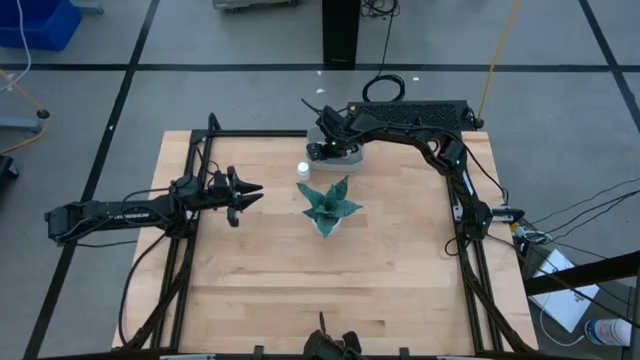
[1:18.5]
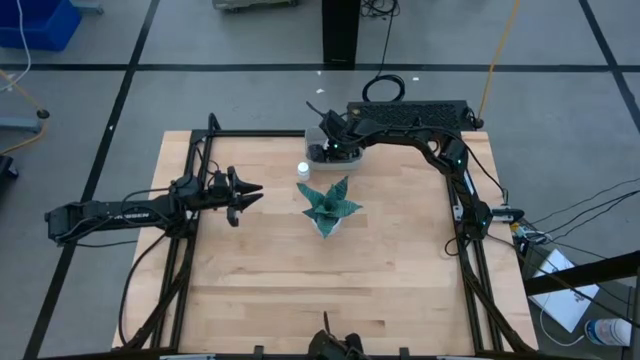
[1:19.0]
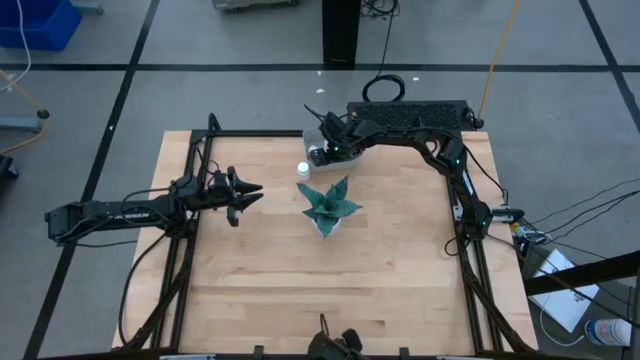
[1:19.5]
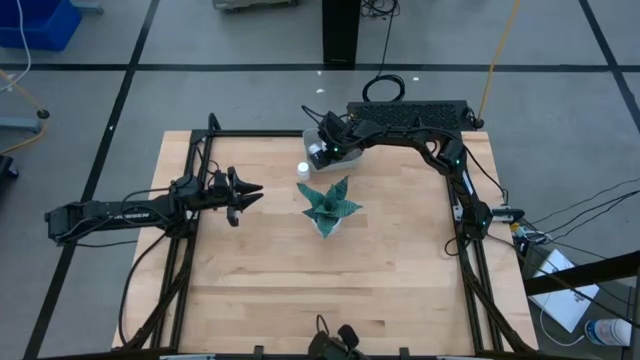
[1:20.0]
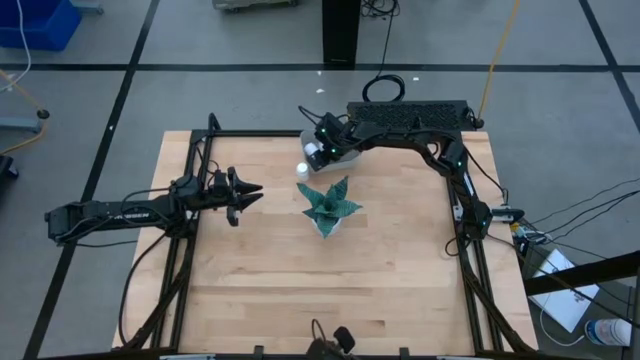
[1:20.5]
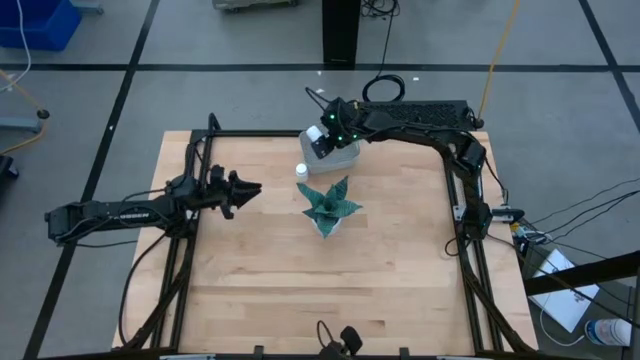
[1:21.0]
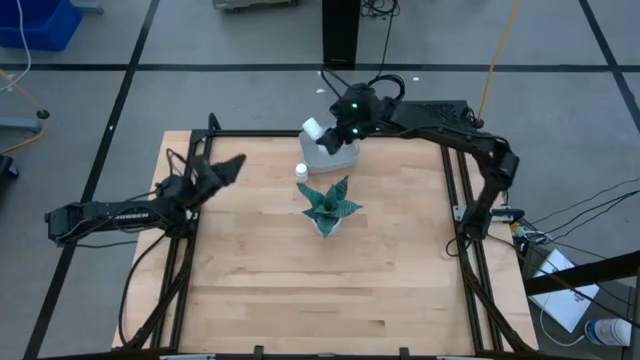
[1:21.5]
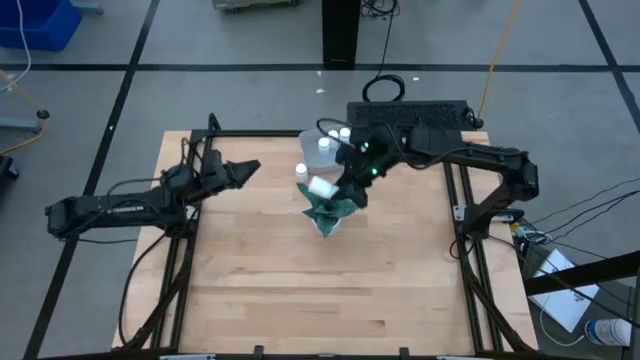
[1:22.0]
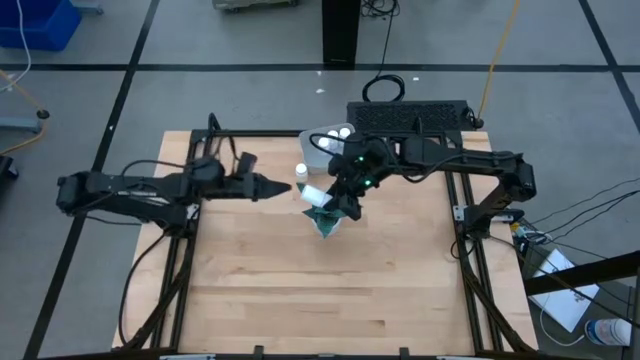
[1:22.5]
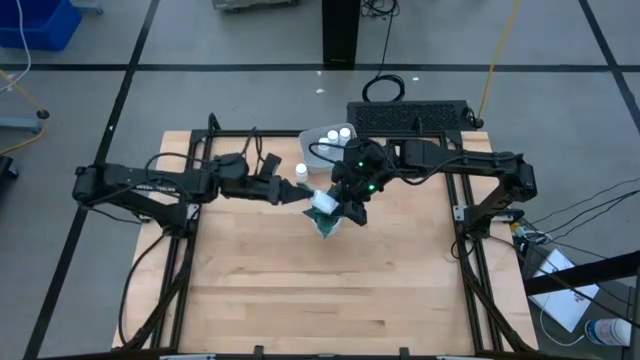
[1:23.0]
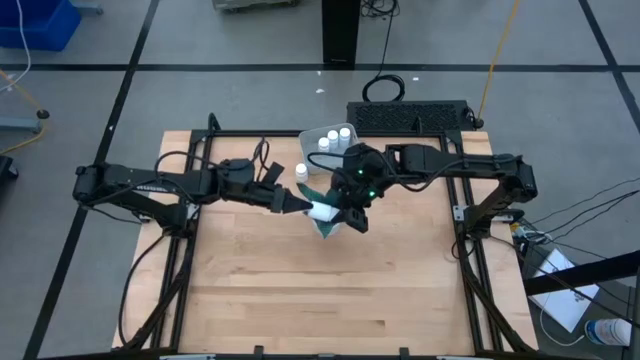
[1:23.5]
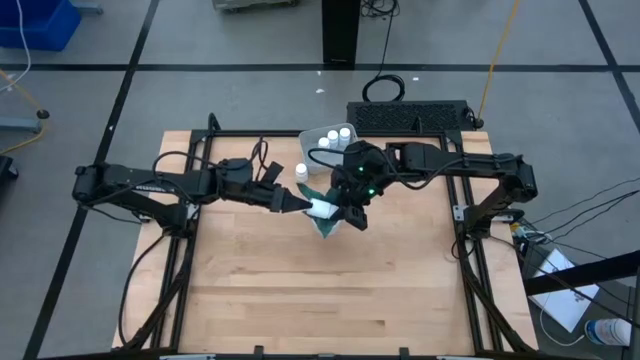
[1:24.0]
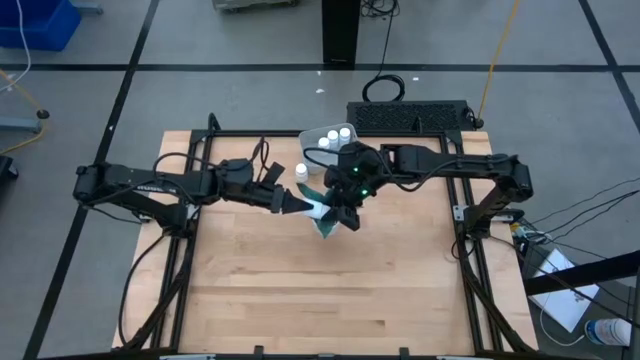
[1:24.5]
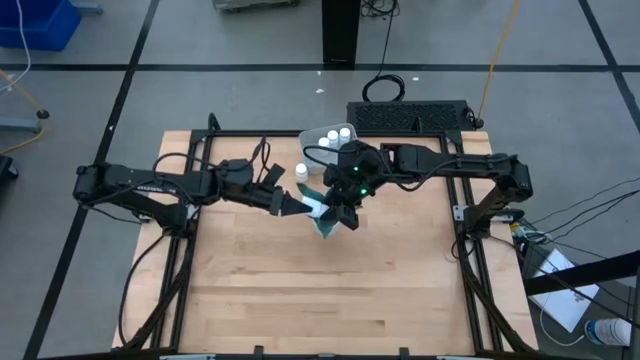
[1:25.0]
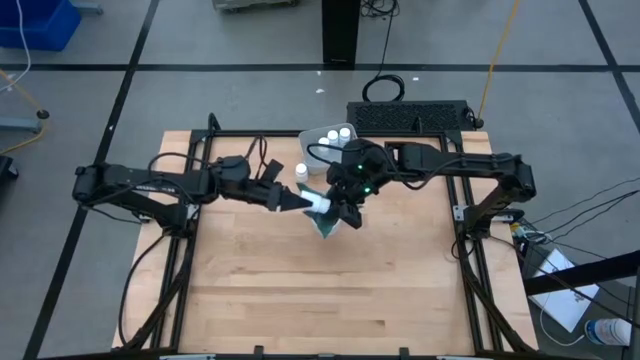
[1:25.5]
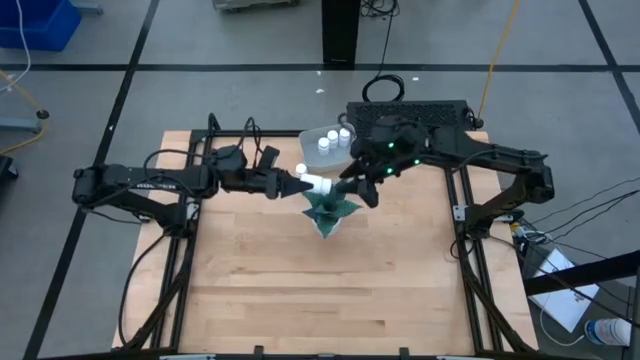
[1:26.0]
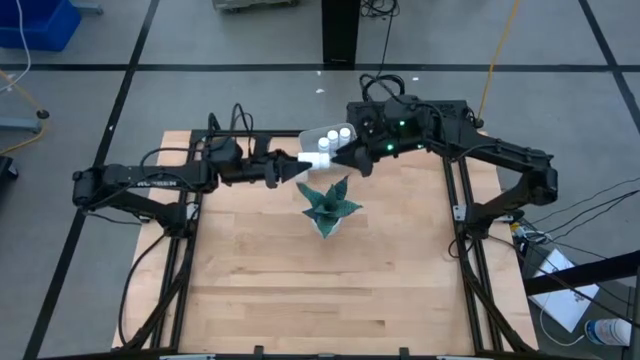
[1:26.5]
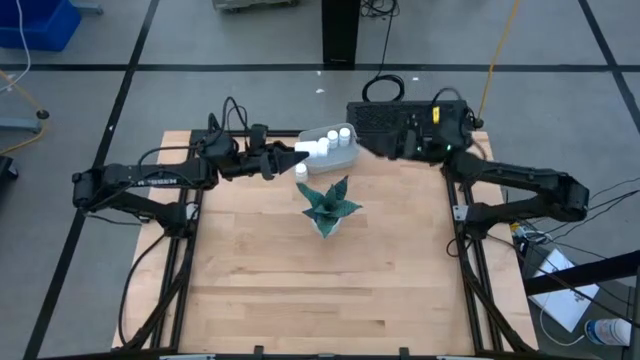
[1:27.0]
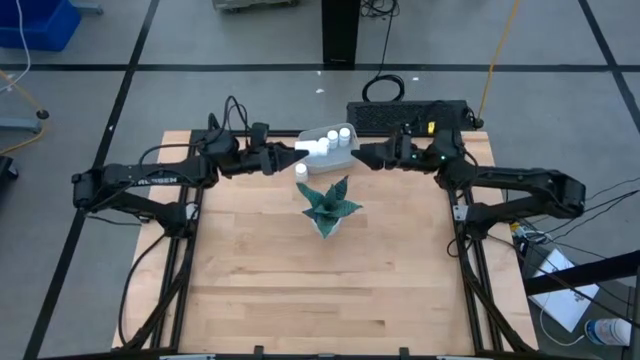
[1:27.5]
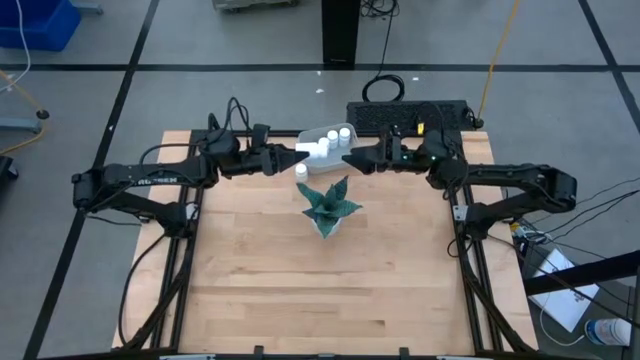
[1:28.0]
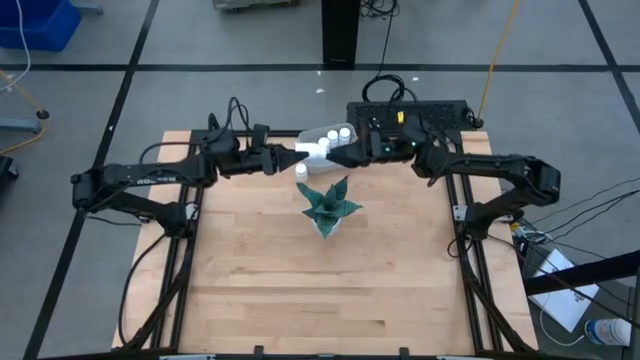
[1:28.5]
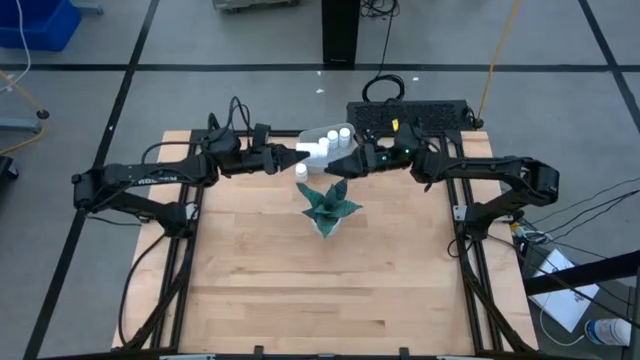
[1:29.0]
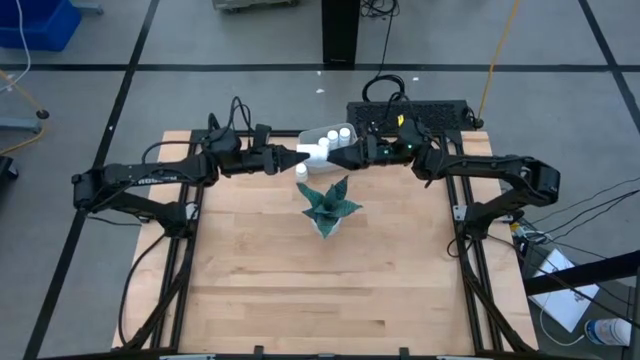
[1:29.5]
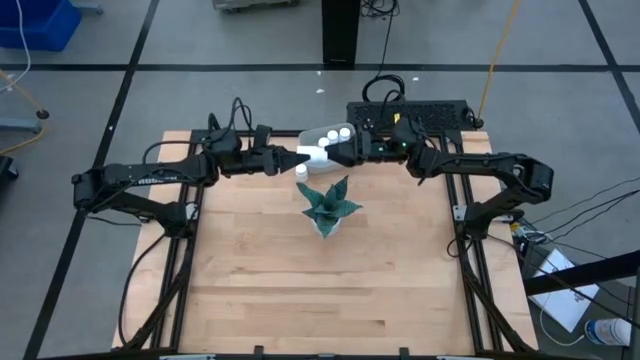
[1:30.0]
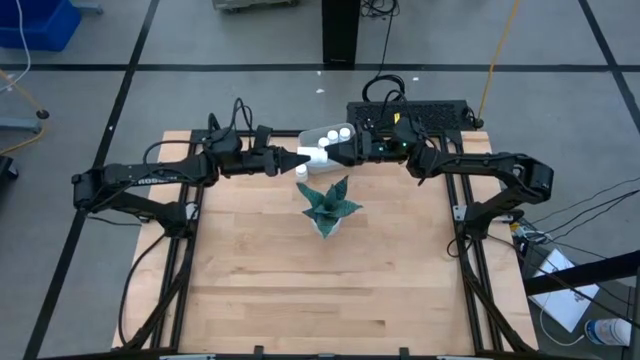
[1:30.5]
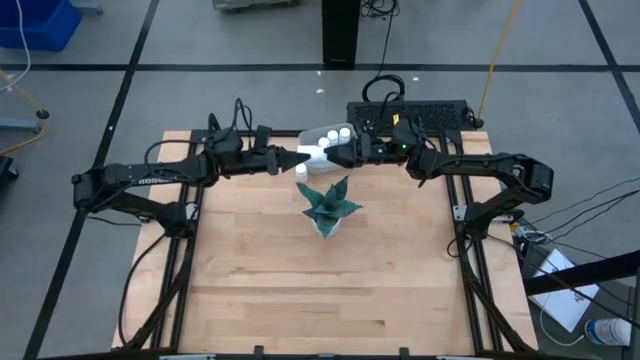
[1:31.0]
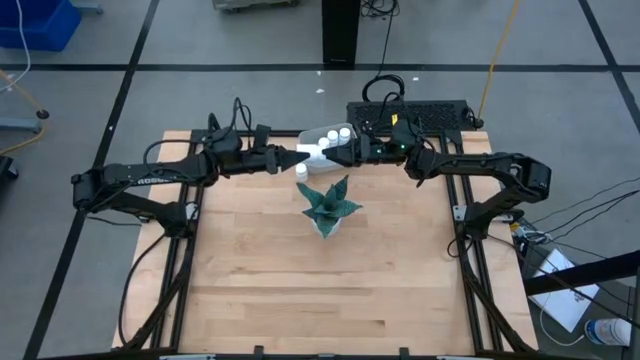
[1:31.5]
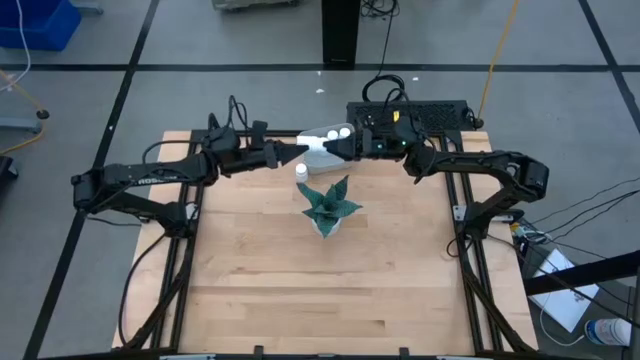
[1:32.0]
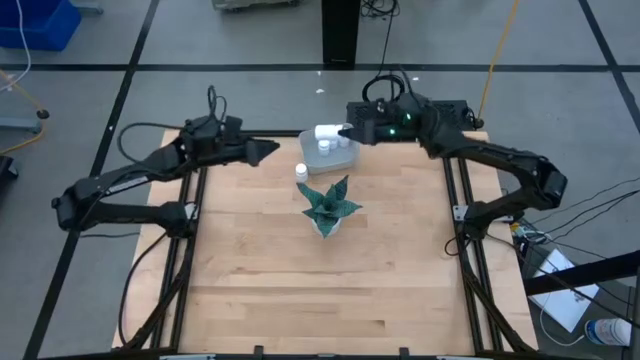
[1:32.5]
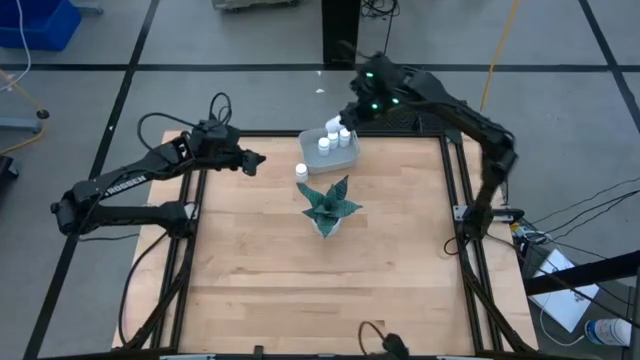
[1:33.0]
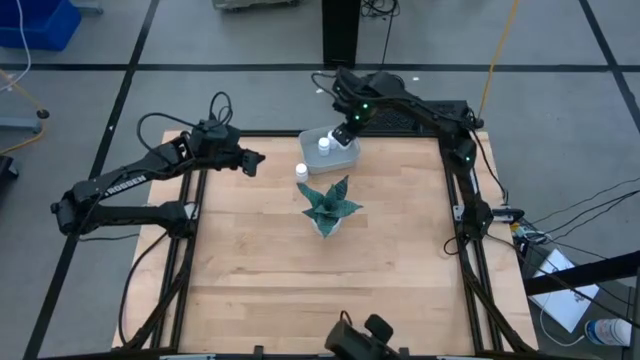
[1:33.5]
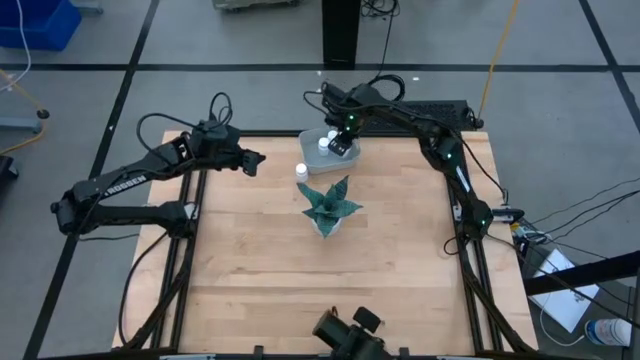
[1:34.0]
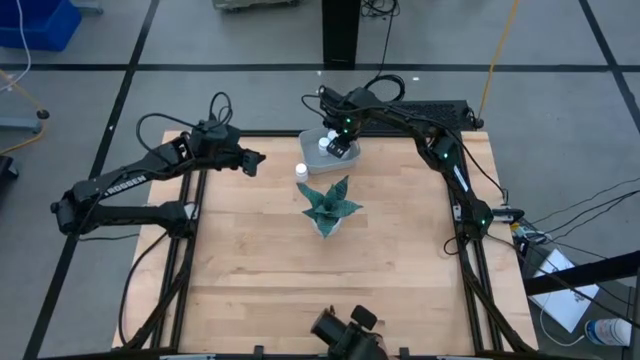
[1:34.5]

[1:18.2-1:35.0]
Task: Pick and place pill bottles into a basket
Put the white medicine bottle into the gray bin

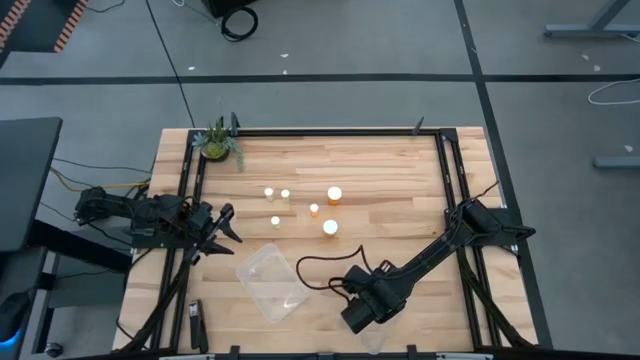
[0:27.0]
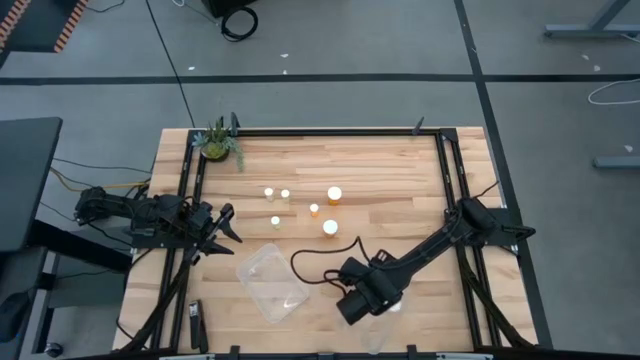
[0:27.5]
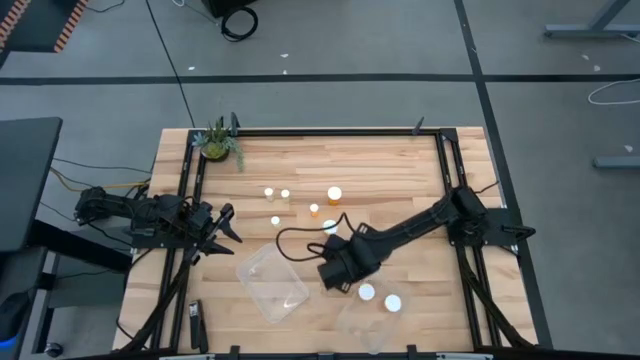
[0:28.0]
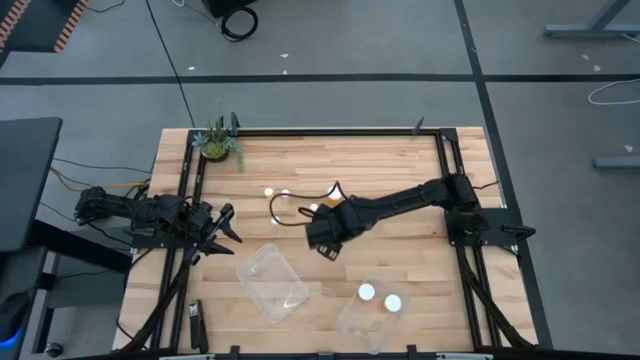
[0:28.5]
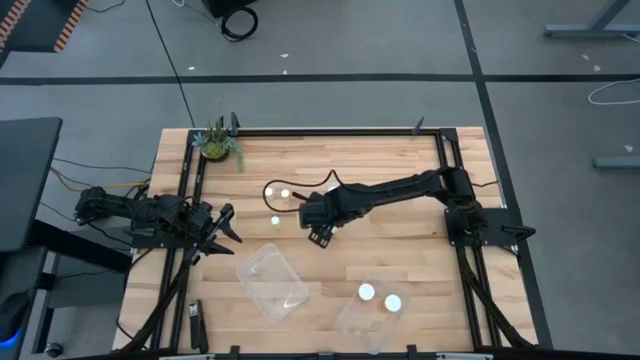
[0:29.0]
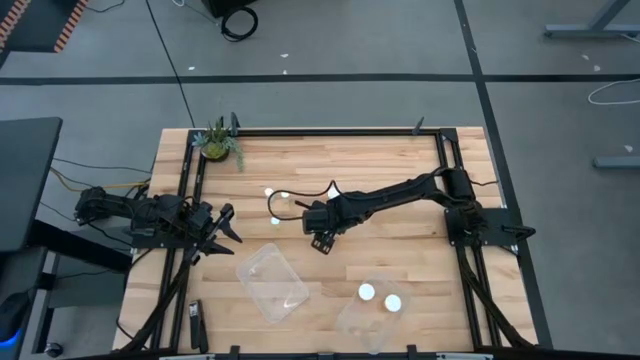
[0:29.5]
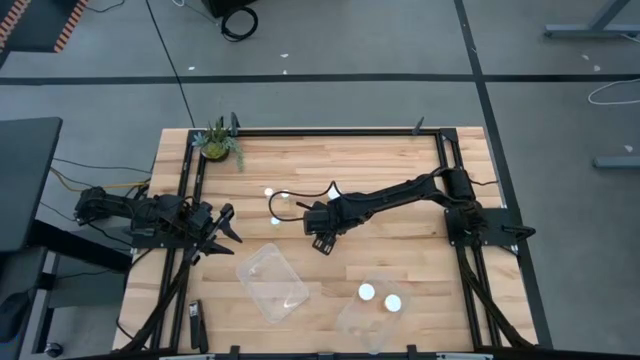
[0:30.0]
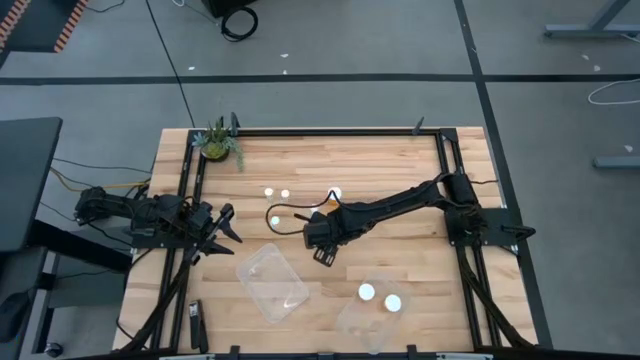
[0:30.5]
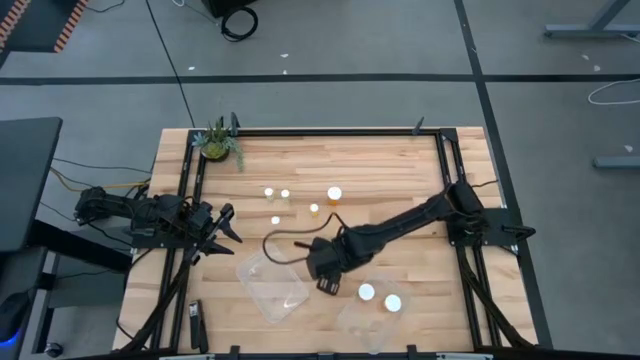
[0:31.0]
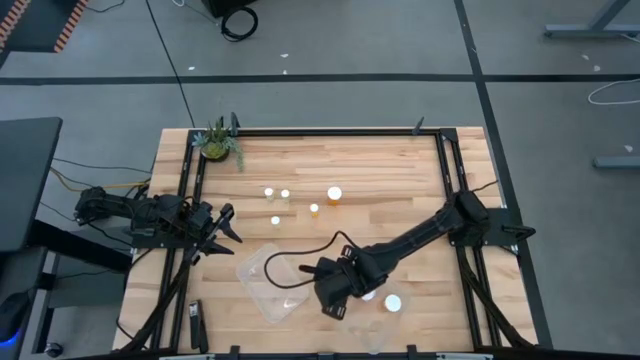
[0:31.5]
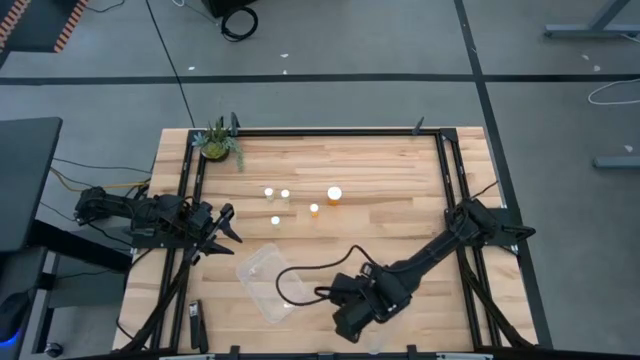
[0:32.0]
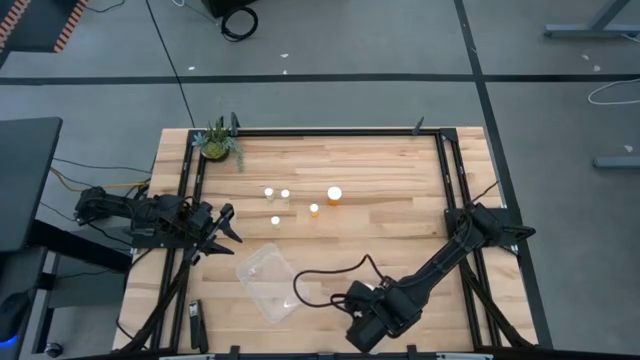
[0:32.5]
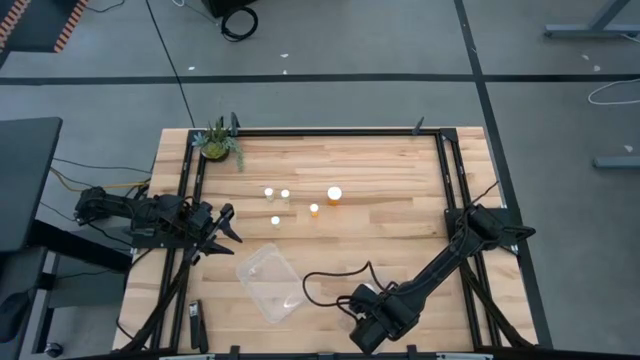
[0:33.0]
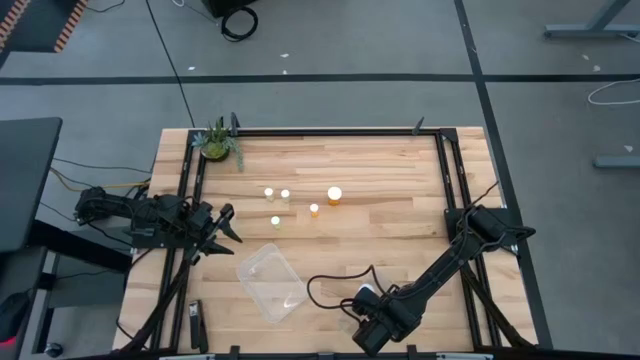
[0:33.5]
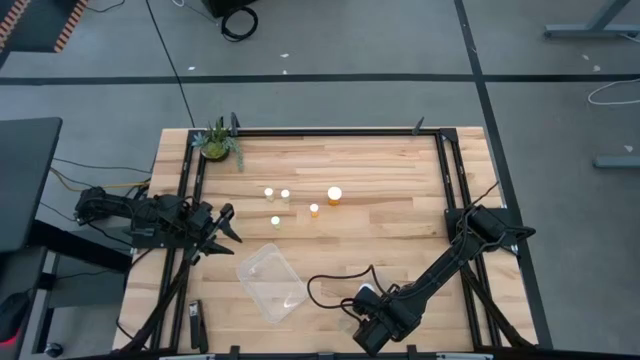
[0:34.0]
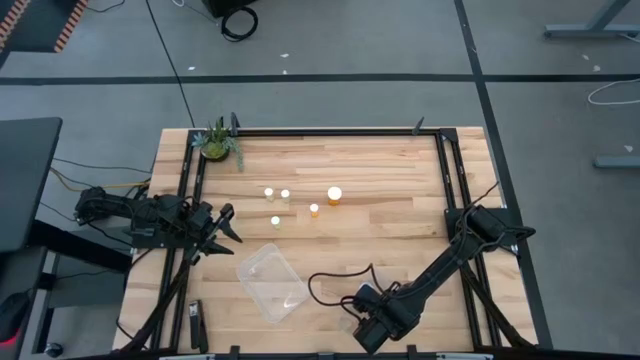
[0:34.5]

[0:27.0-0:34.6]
Task: Pick and place medicine bottles into bin by pill shape (circle, oval)
Put the large orange pill bottle into the right transparent bin
